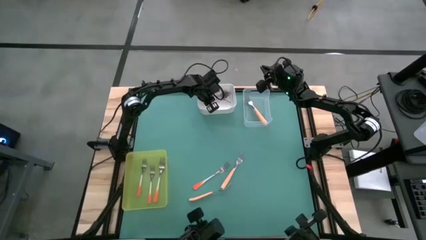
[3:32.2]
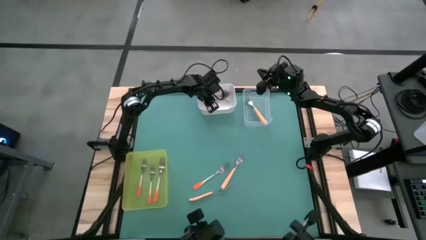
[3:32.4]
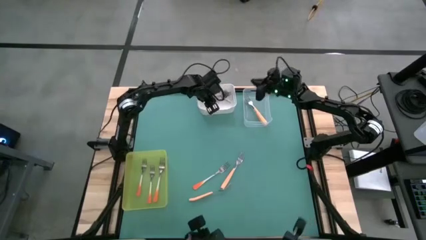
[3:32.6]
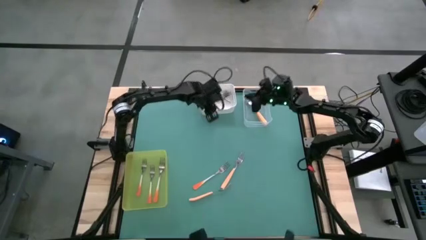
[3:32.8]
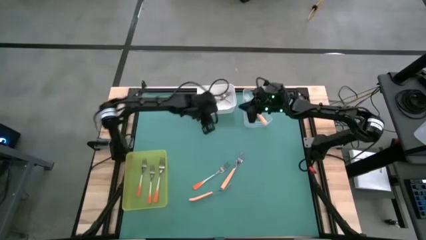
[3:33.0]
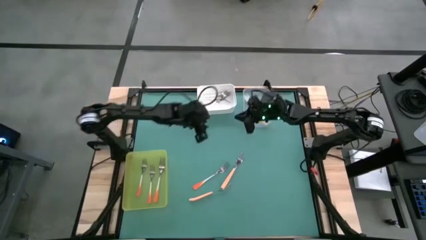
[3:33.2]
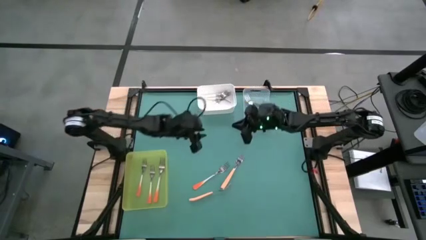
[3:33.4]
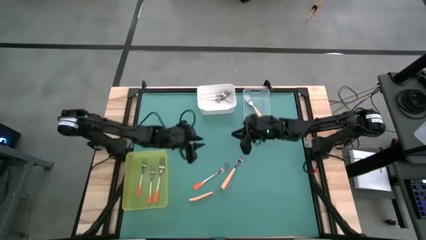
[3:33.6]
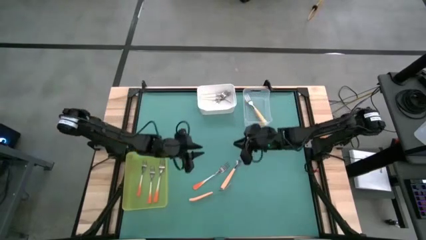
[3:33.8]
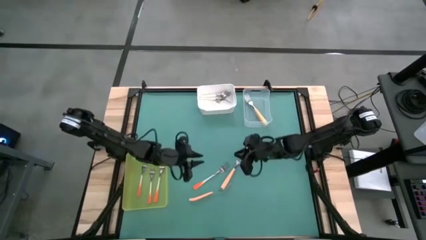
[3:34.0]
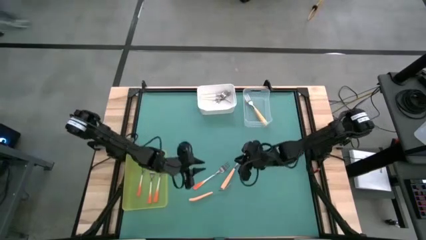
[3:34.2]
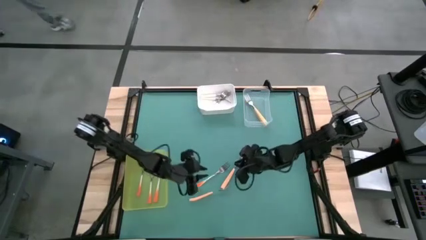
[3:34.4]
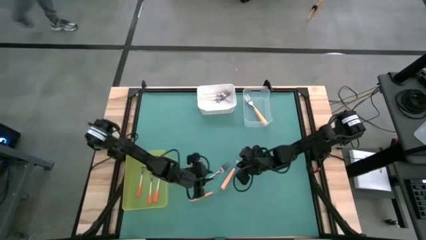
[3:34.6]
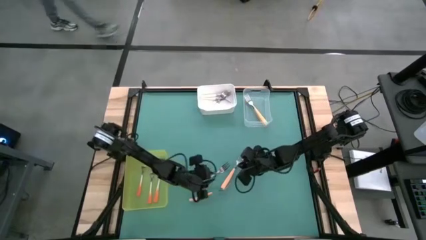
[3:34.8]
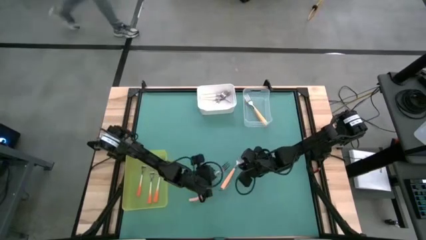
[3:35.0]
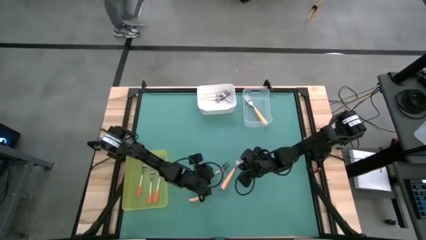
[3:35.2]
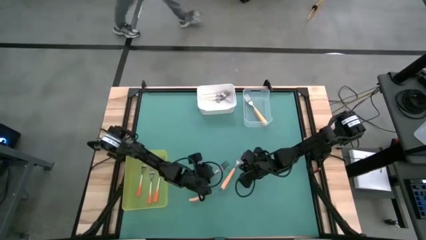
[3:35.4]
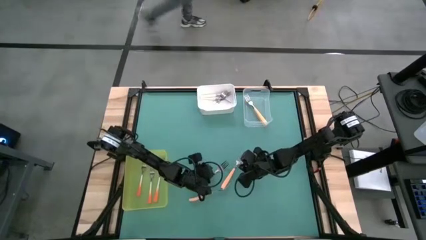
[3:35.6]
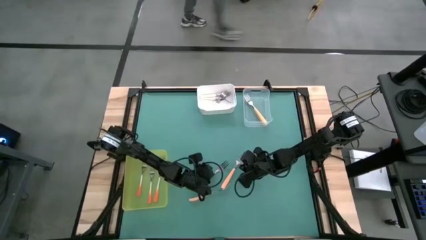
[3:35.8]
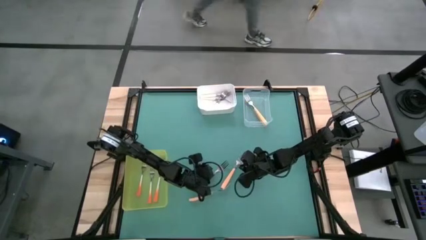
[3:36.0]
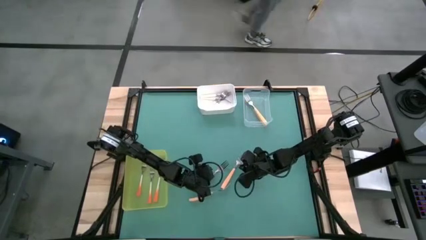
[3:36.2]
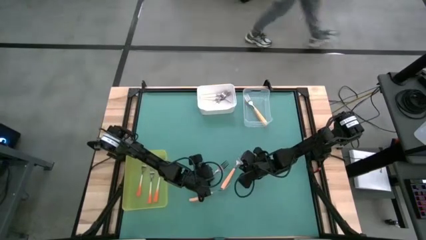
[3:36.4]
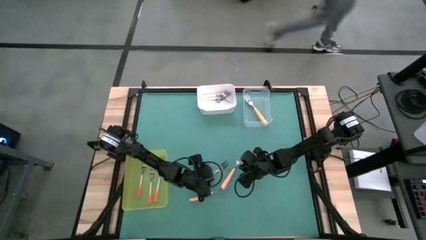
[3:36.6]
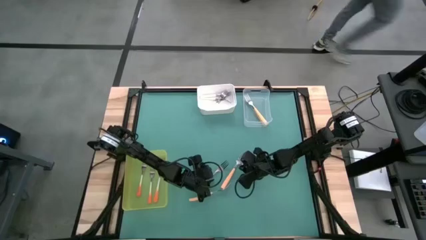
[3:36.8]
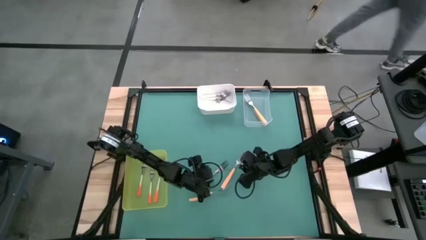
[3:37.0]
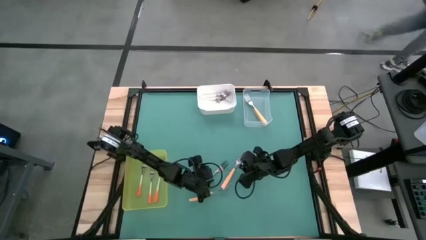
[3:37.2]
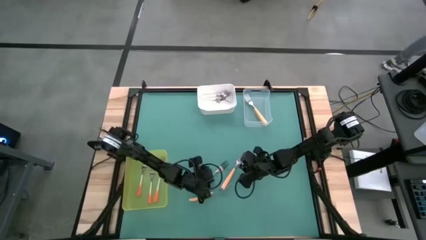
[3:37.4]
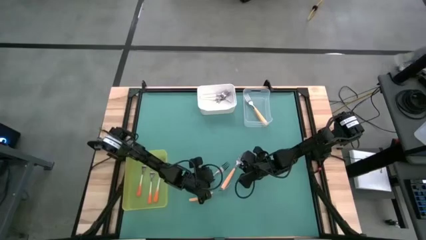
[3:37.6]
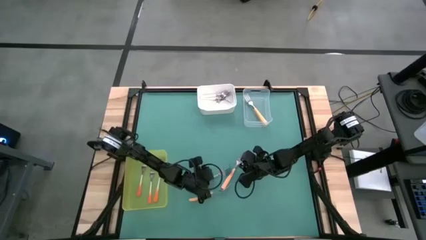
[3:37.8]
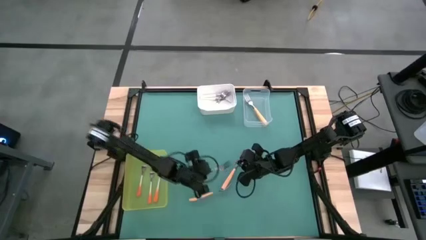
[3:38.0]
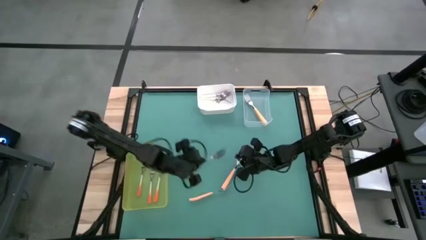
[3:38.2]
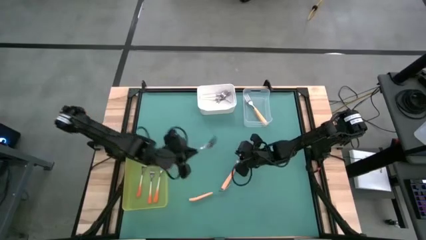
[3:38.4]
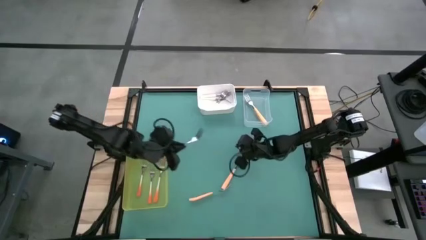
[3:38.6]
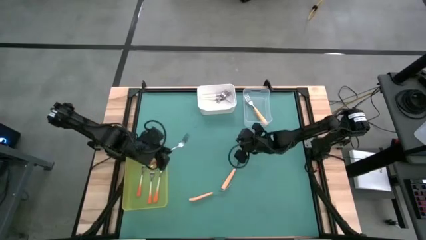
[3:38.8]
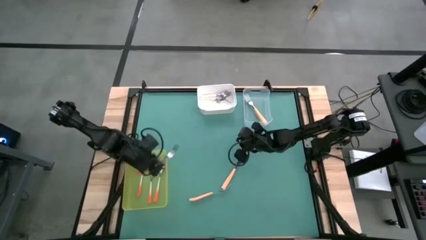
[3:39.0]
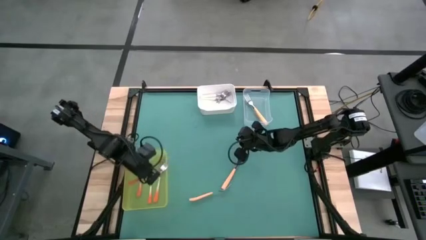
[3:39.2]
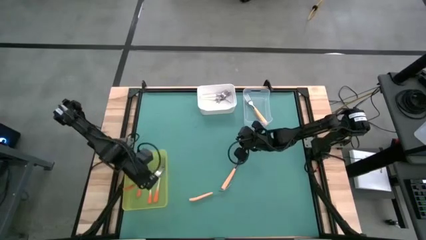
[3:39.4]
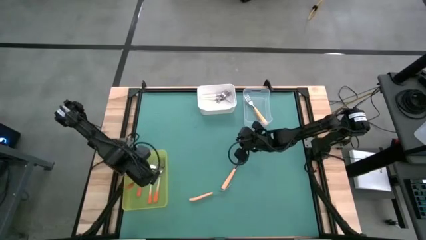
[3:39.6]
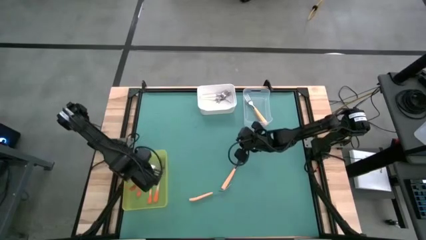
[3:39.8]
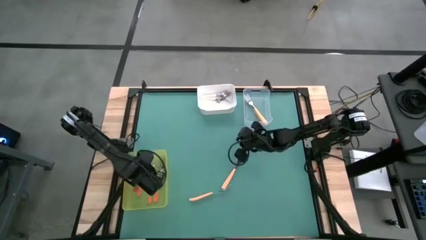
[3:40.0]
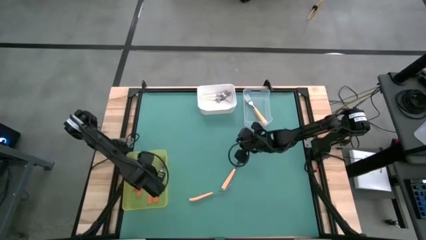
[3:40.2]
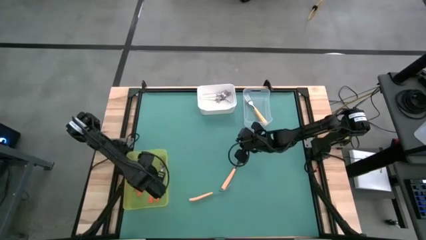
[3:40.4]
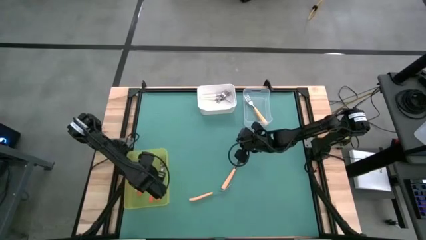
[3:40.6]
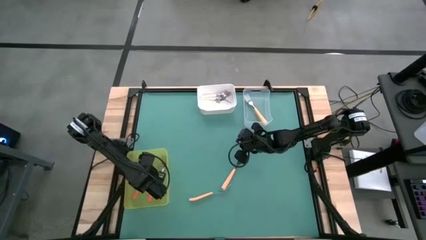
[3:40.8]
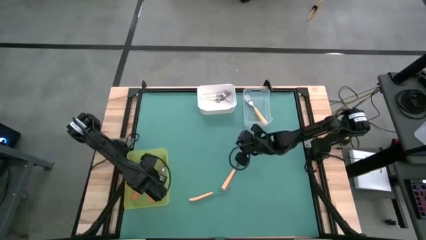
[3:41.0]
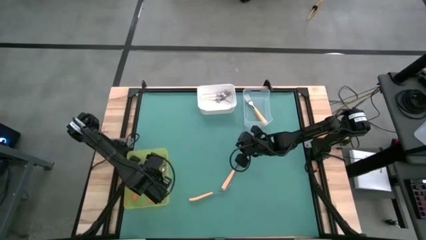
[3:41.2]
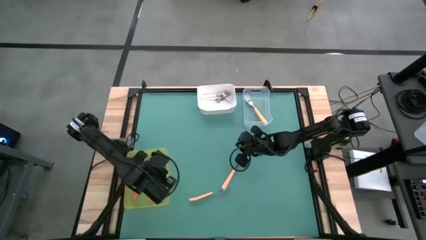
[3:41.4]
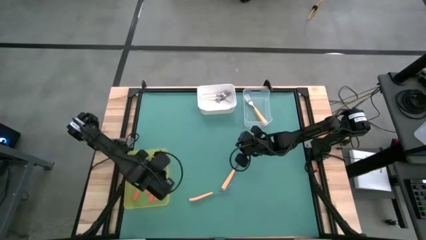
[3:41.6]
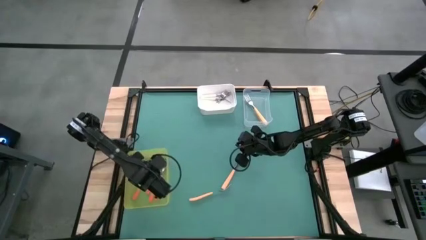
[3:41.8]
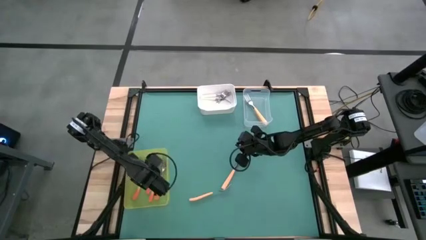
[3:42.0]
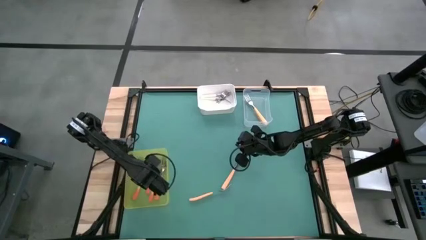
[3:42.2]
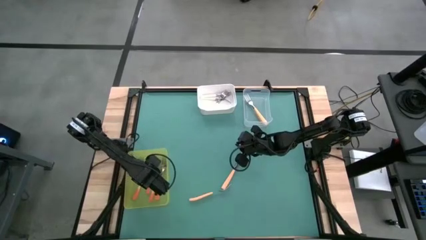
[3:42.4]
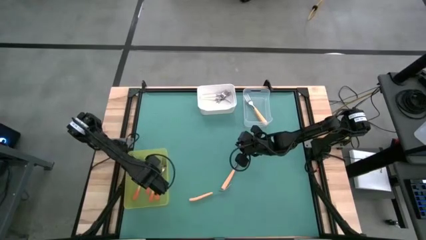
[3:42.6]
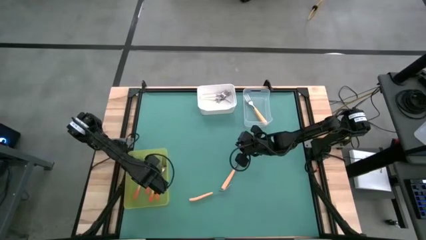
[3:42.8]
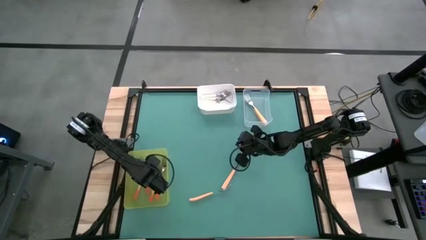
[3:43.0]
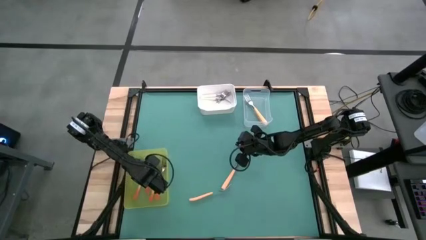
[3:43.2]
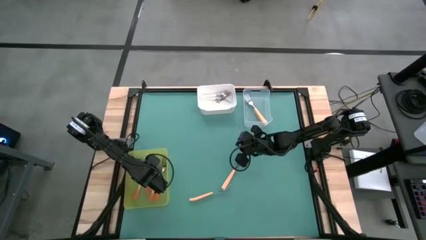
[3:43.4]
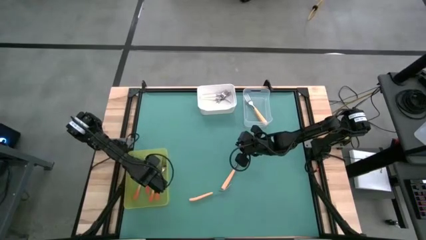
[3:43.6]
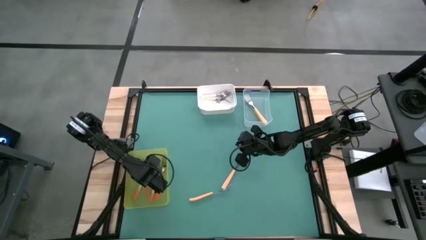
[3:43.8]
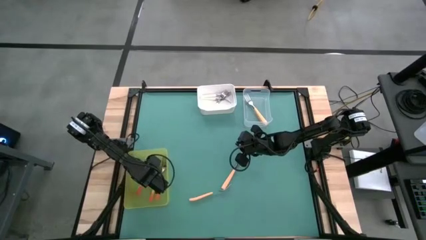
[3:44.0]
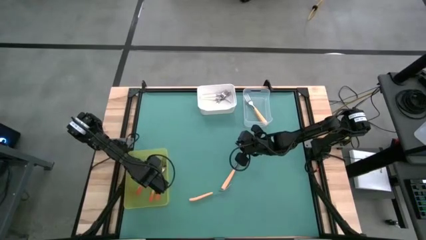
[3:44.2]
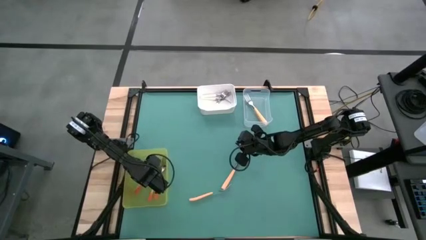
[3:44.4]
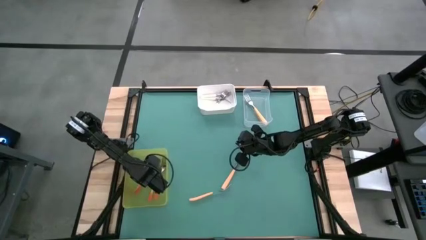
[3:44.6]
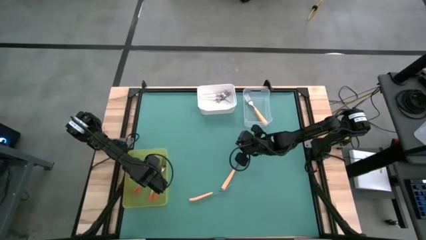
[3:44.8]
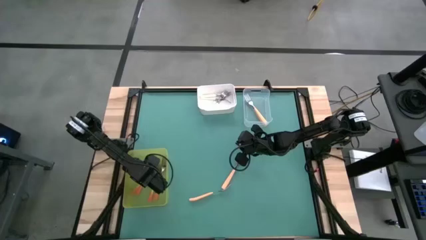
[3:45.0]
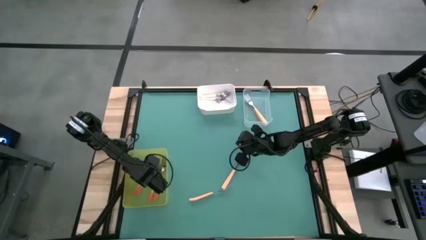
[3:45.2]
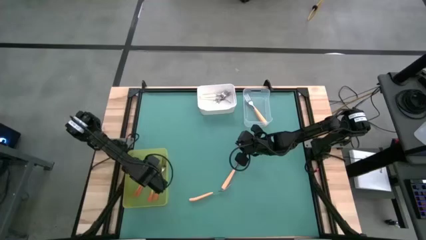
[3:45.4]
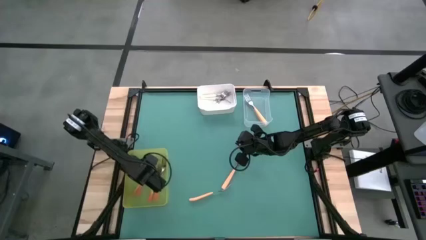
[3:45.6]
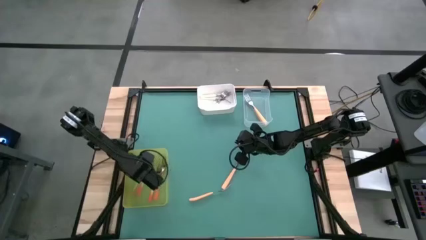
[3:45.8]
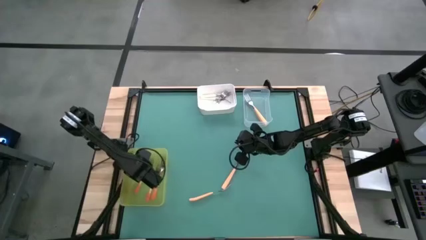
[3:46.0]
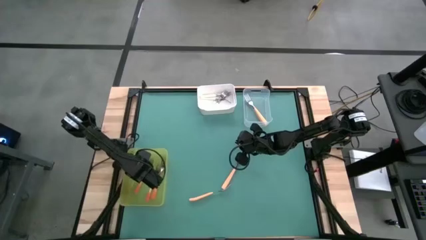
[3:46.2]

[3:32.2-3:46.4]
Task: Sort silverware by color (type)
Put the orange fork into the yellow bin

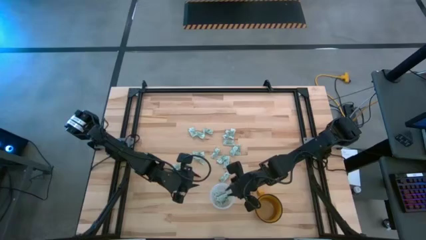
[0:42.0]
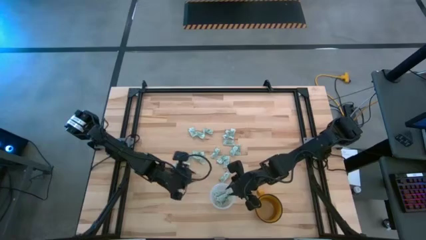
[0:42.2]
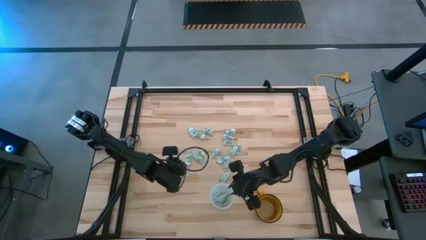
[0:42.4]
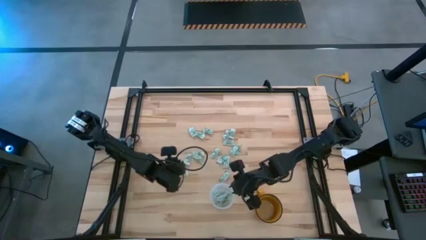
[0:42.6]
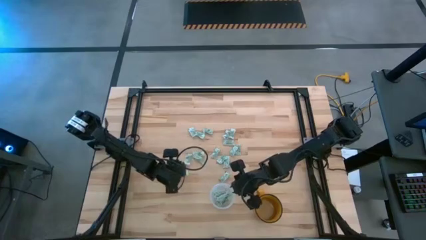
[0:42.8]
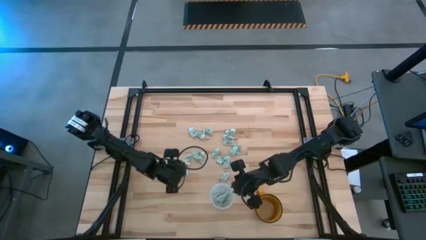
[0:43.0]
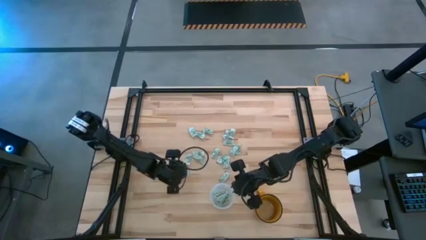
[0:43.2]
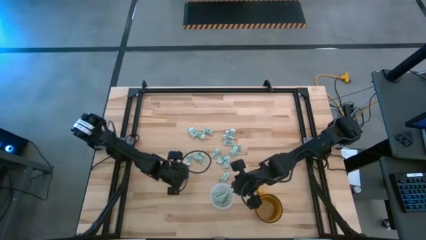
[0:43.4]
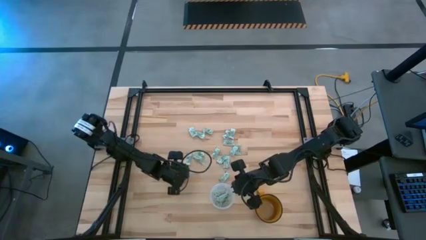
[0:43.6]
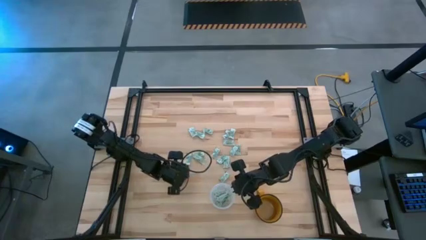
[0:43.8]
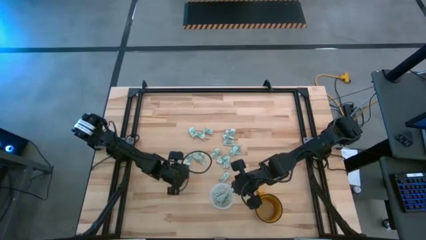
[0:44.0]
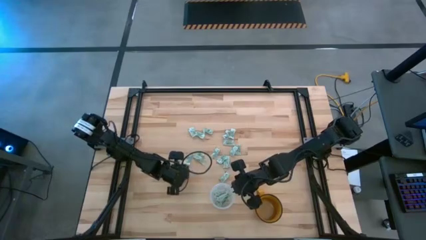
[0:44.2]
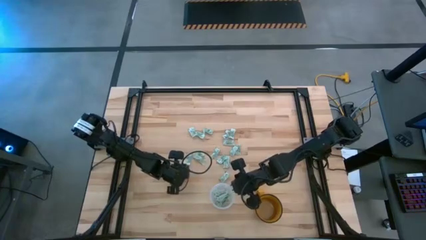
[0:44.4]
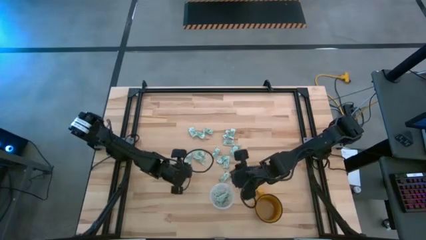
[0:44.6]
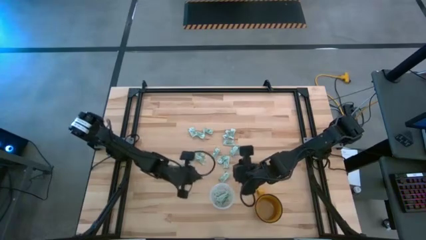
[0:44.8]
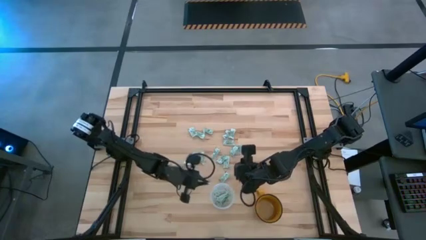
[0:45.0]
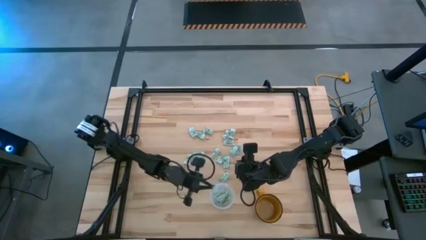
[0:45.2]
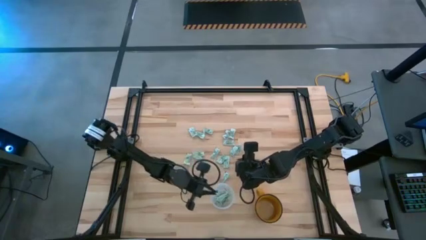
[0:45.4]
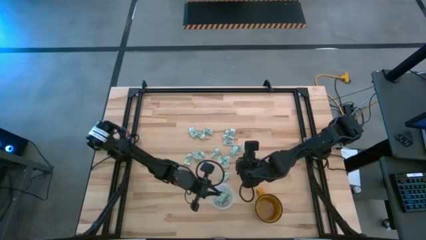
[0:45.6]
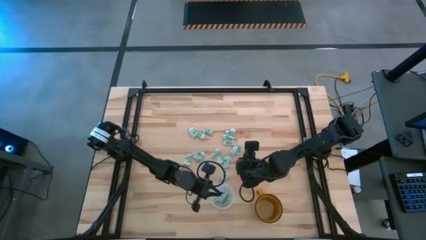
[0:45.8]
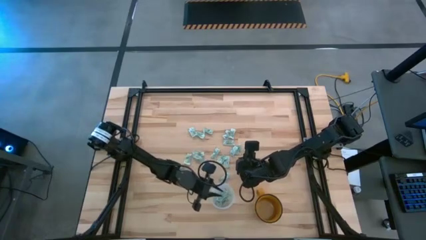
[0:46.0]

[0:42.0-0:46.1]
Task: Pick and place Stevia / Truvia into bins
Put the stevia packet into the transparent bin
